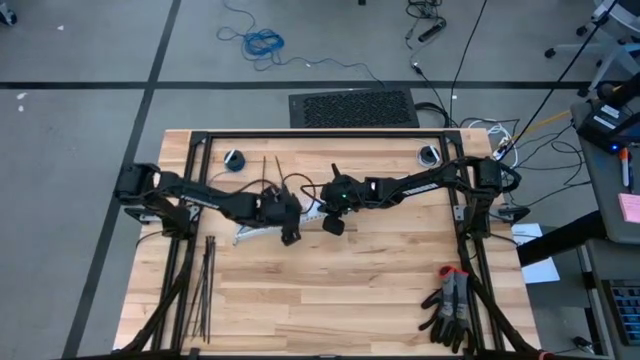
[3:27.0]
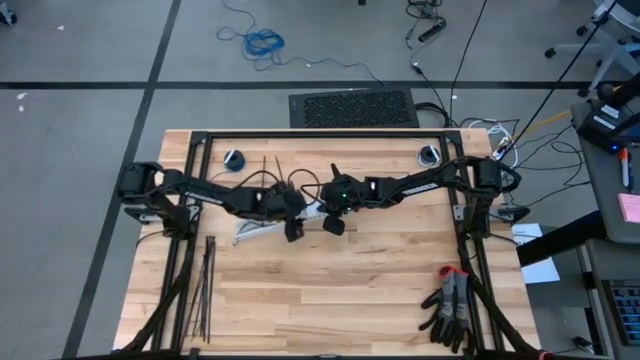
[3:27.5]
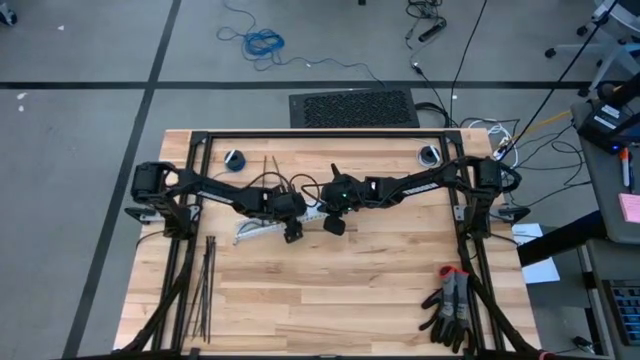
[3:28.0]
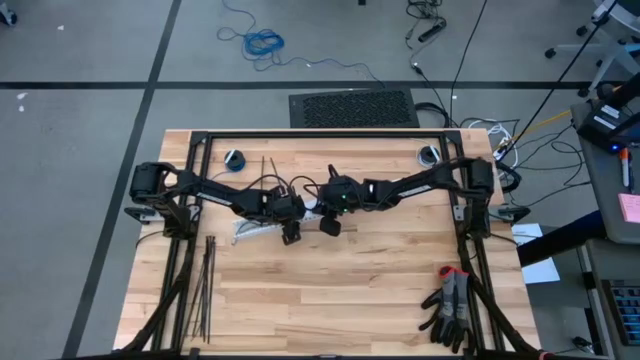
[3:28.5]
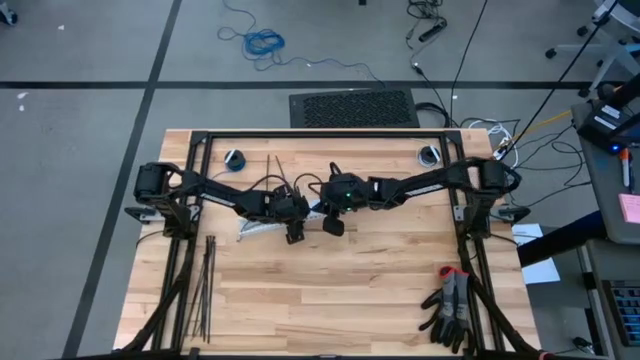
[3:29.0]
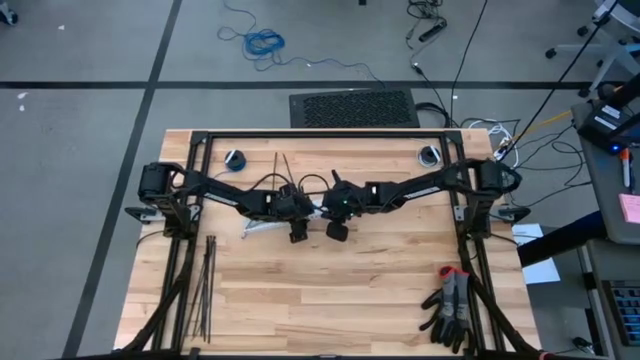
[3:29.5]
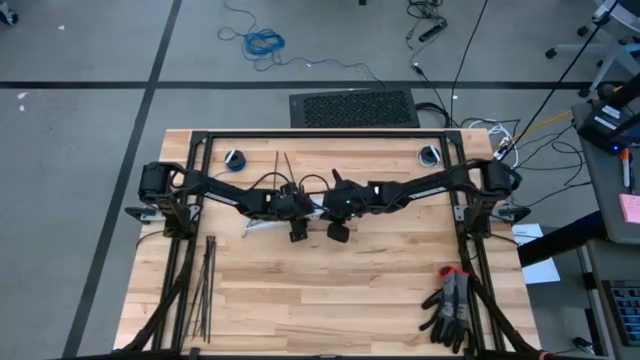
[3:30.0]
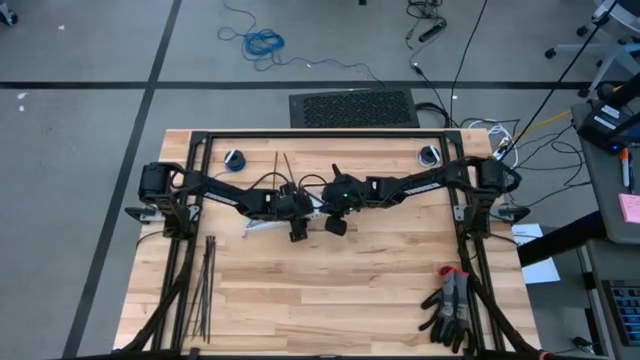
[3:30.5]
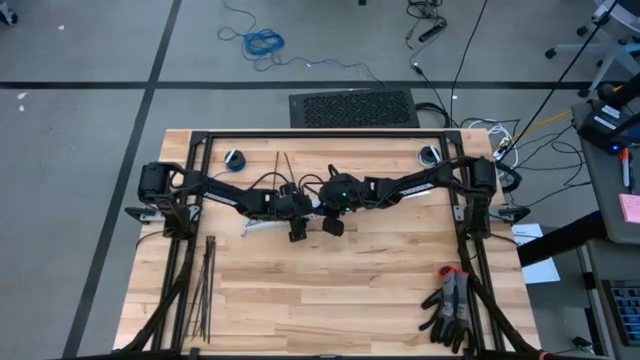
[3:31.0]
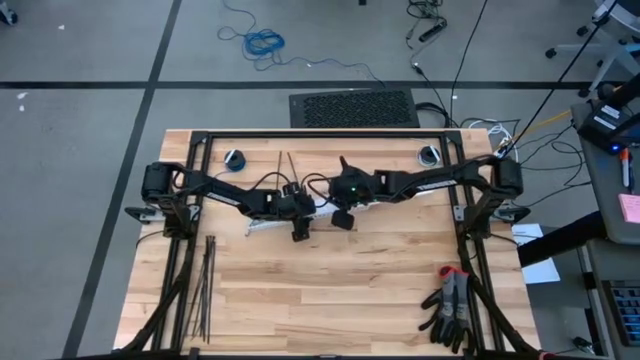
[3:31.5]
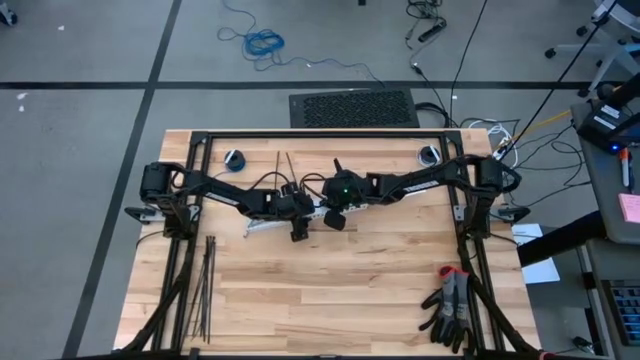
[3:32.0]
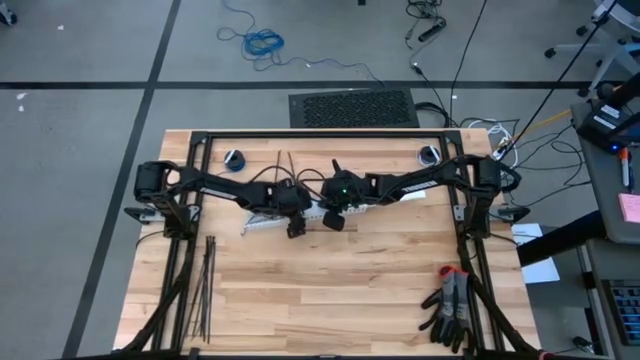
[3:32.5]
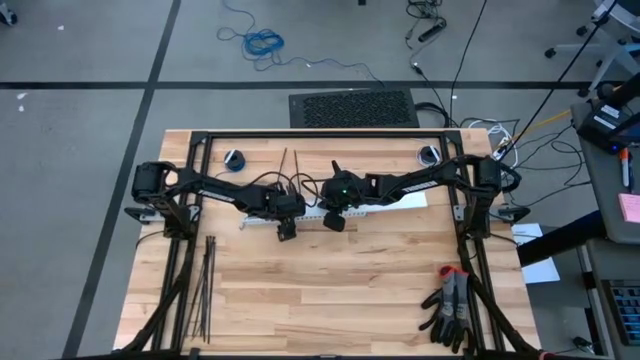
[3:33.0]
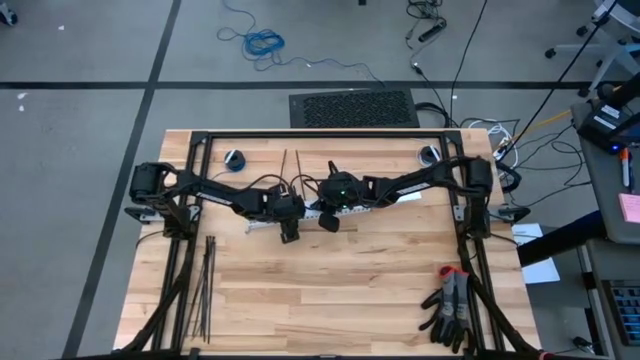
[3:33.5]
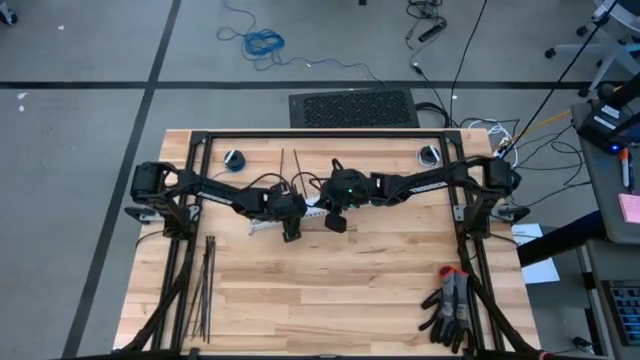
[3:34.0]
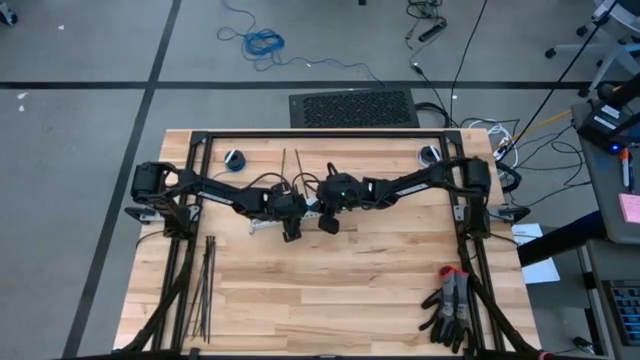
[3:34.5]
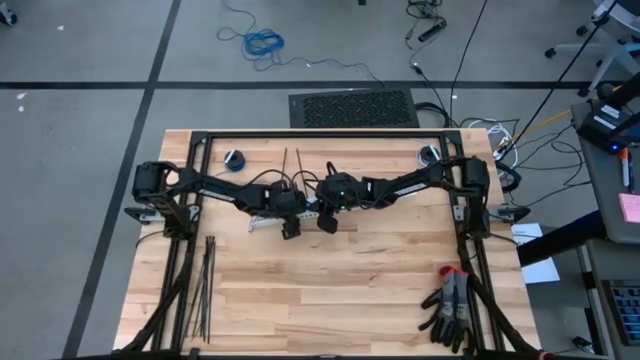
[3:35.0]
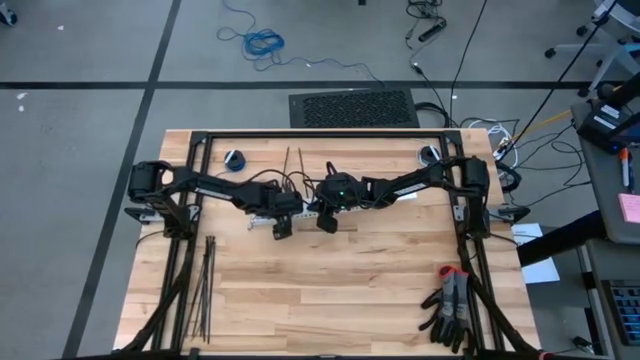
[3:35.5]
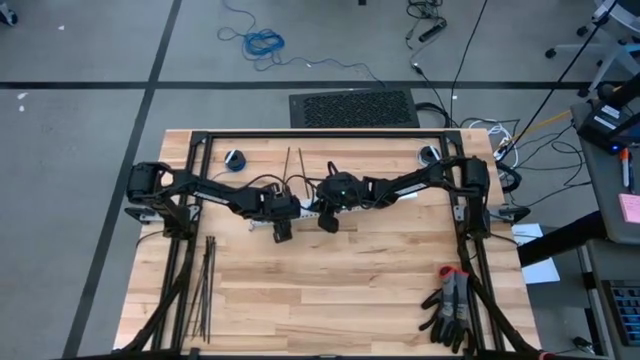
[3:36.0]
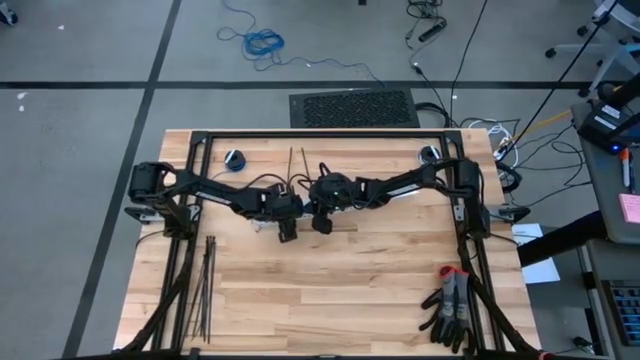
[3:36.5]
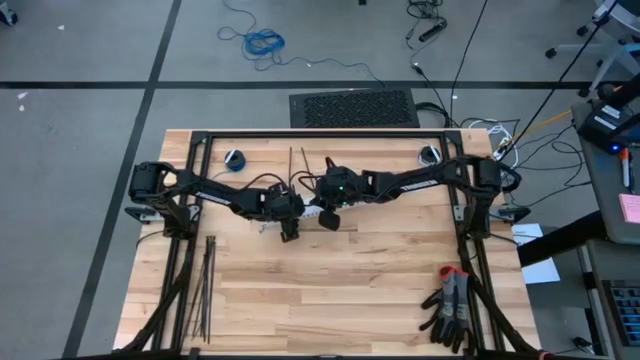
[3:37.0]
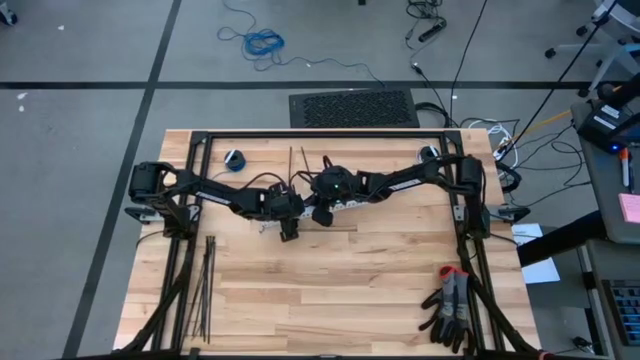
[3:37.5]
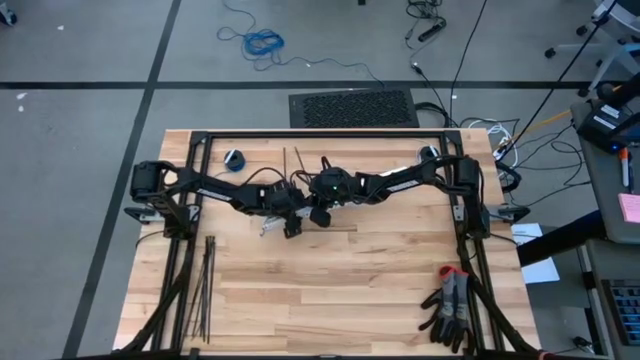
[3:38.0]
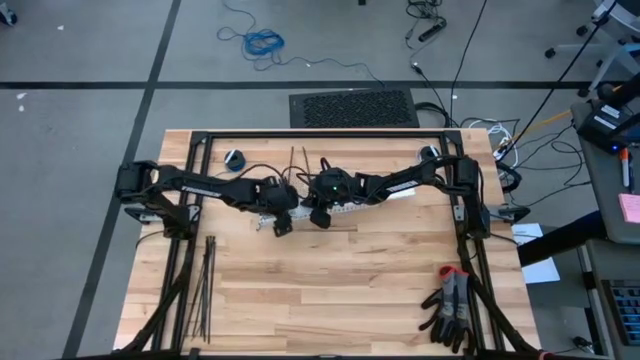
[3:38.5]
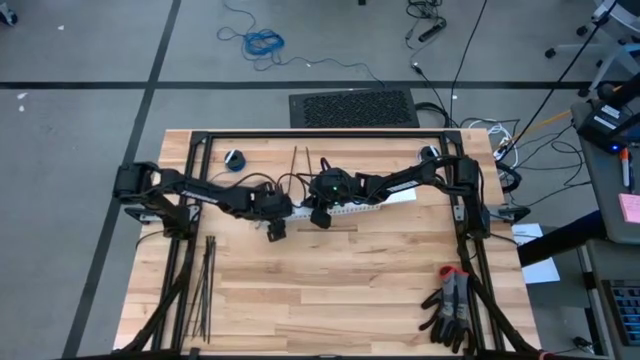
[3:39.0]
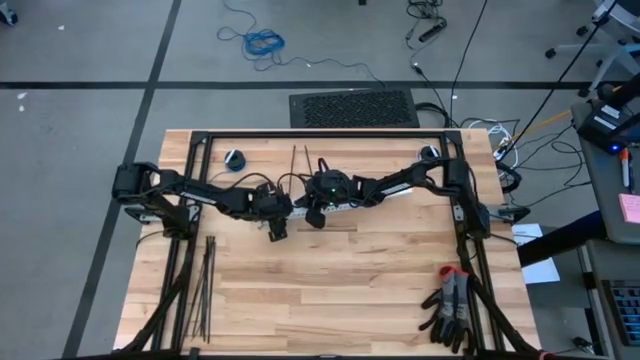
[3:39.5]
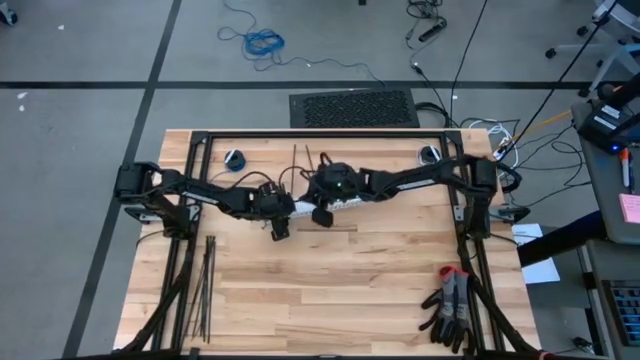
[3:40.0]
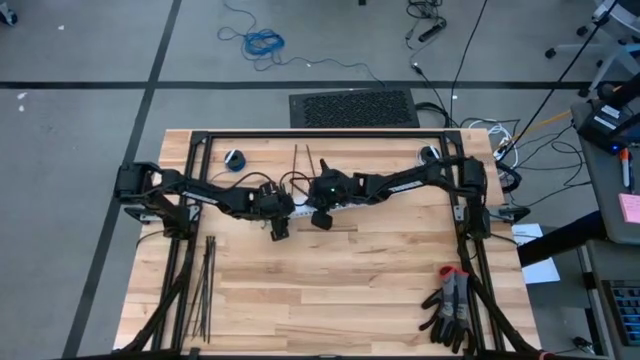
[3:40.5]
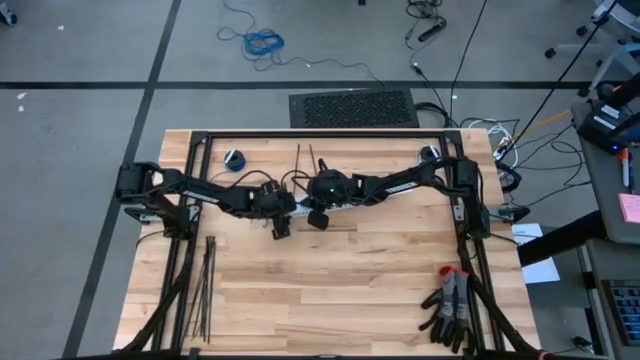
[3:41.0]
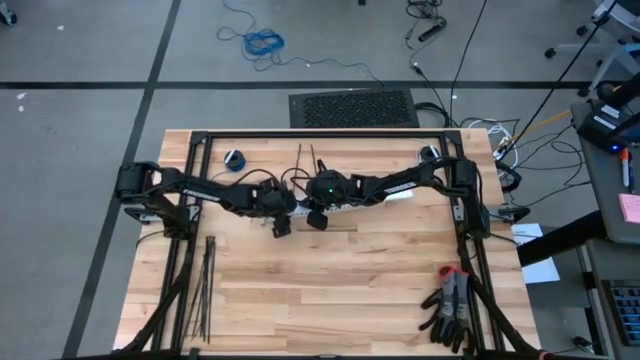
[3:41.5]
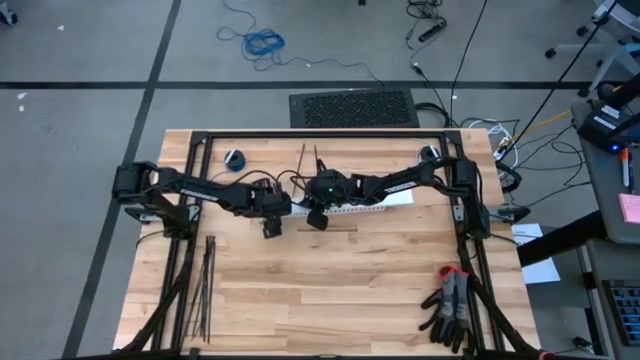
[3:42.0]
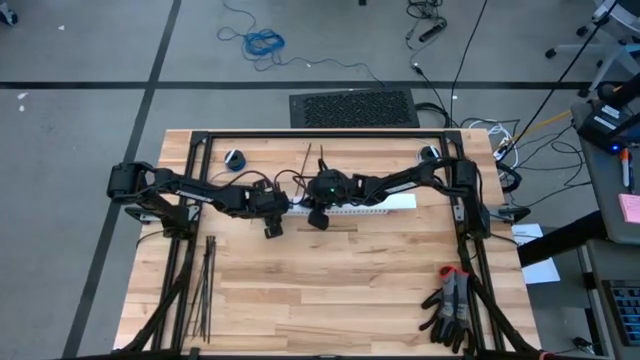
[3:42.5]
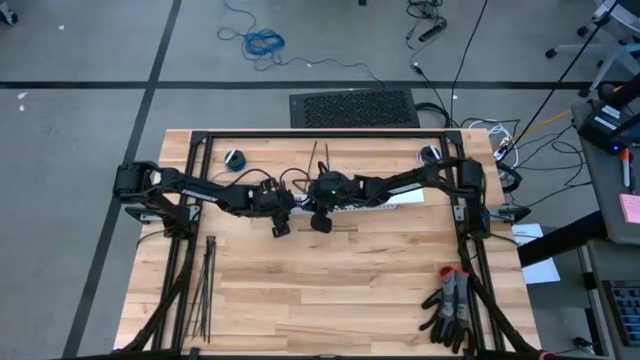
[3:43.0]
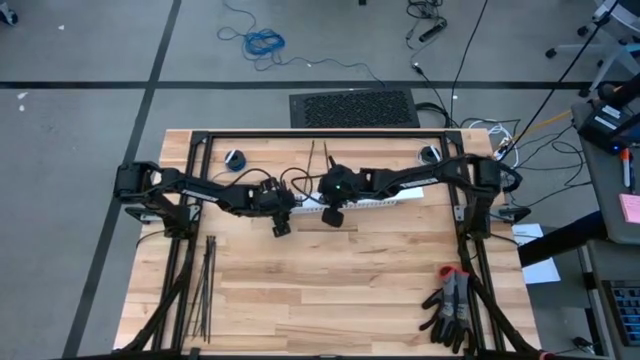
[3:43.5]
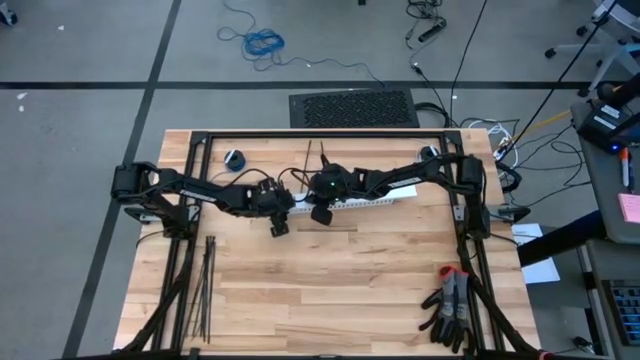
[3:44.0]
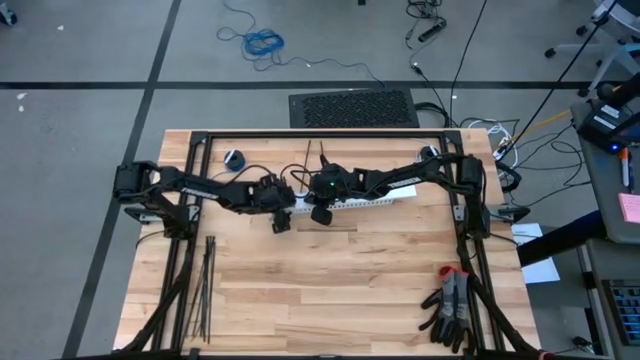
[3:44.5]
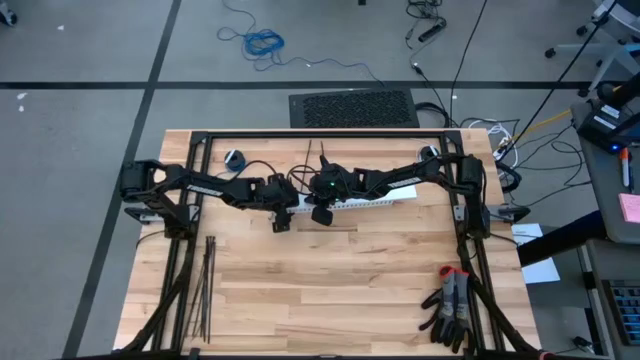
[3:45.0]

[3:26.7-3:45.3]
Task: Ziptie cables
Close the white cable duct

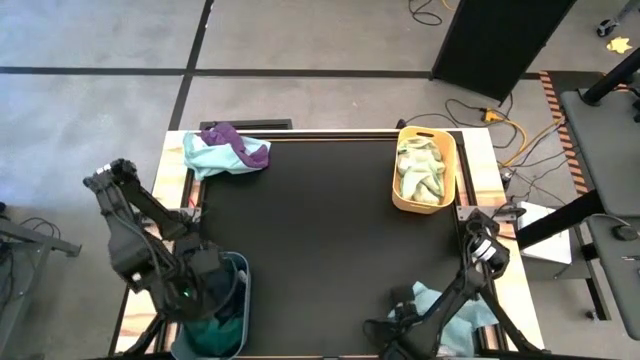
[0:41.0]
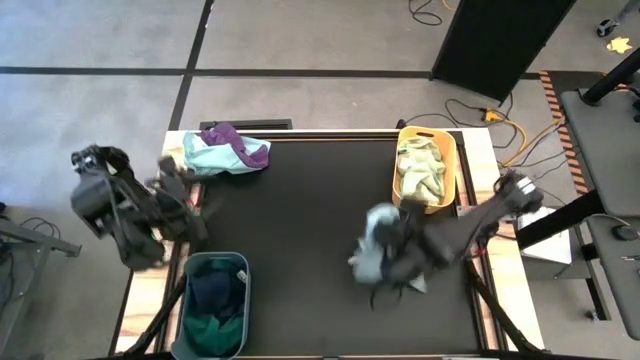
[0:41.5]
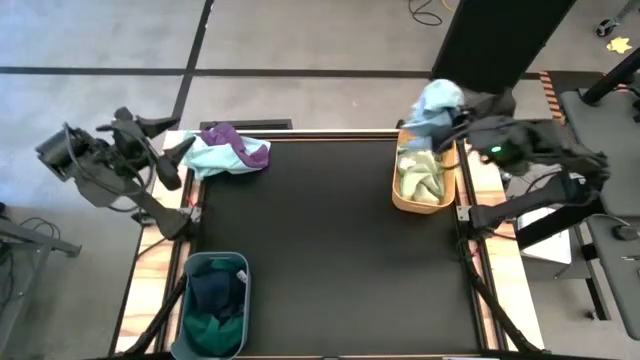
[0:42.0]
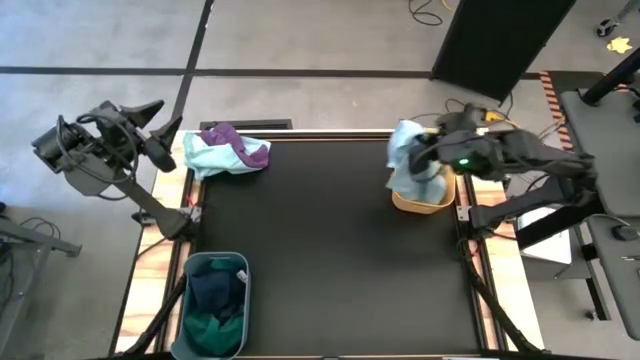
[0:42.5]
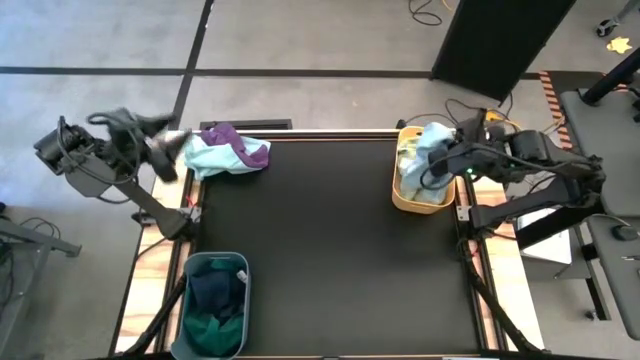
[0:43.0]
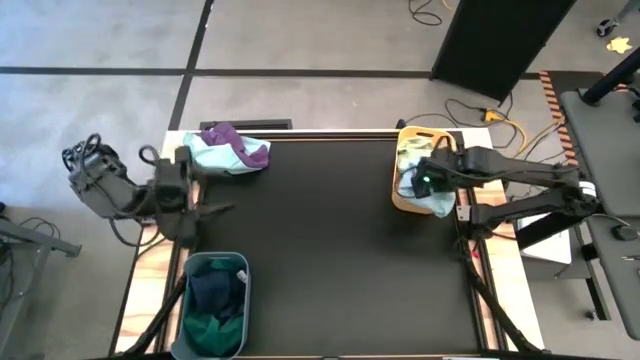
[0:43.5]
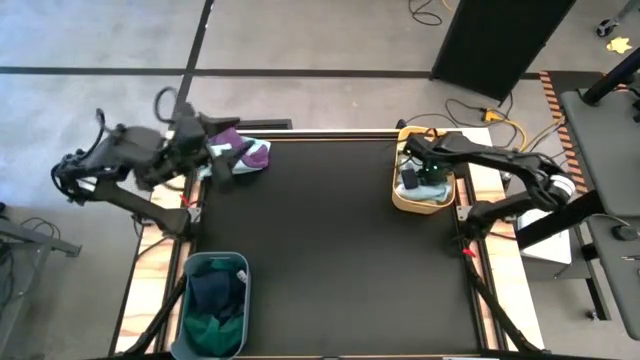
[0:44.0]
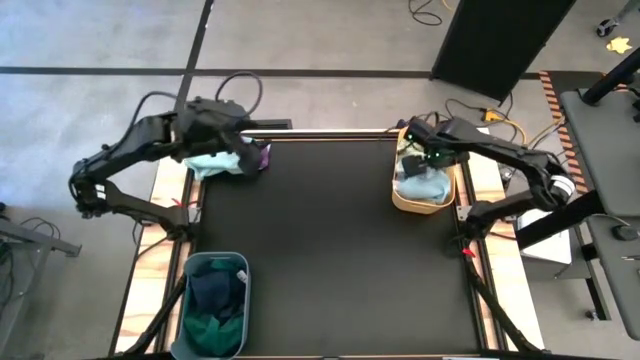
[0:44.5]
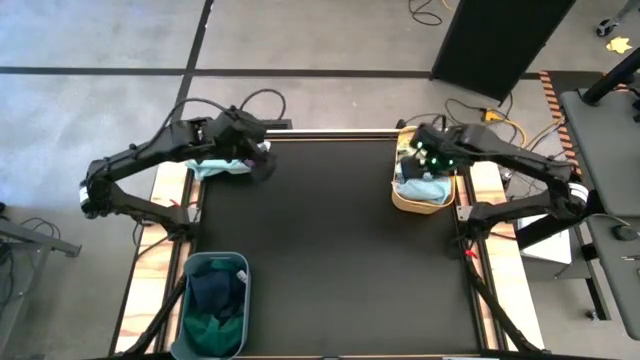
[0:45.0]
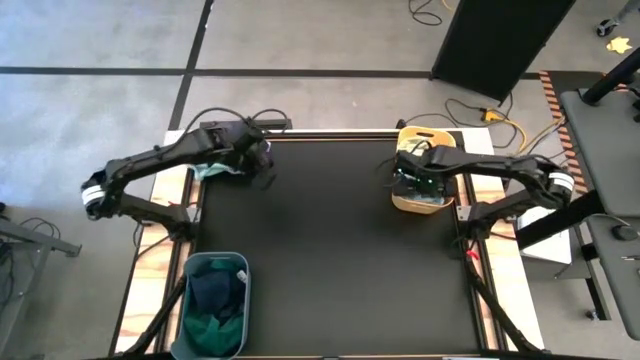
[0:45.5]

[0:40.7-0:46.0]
Task: Sort microfiber towel by color & place in baskets
Put the bottom light blue microfiber towel into the yellow bin
